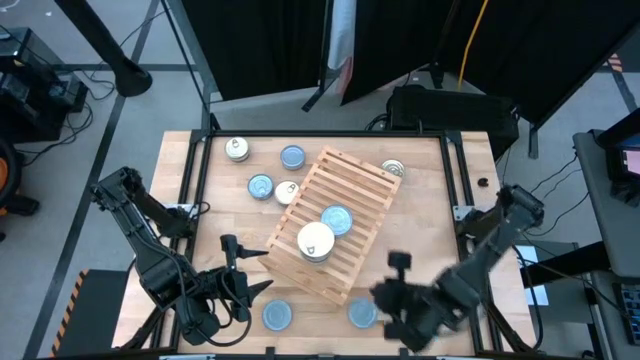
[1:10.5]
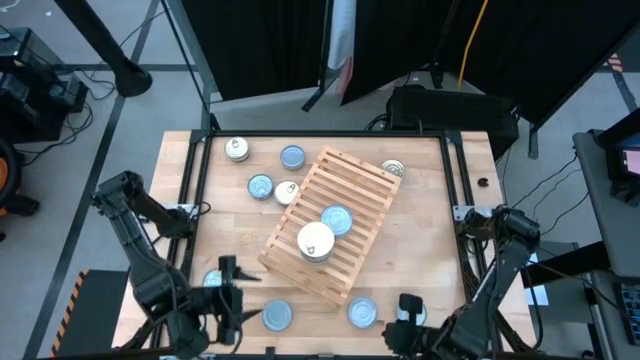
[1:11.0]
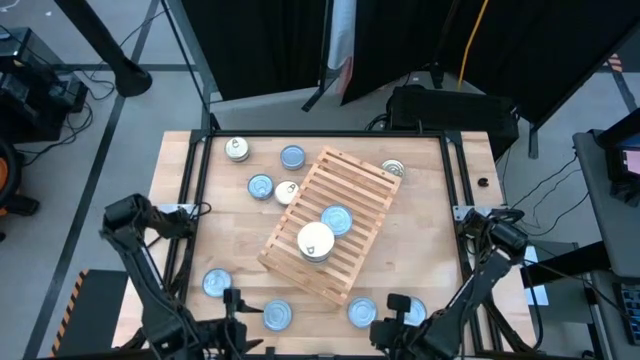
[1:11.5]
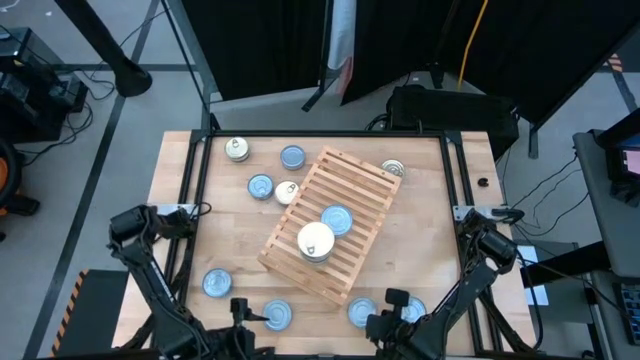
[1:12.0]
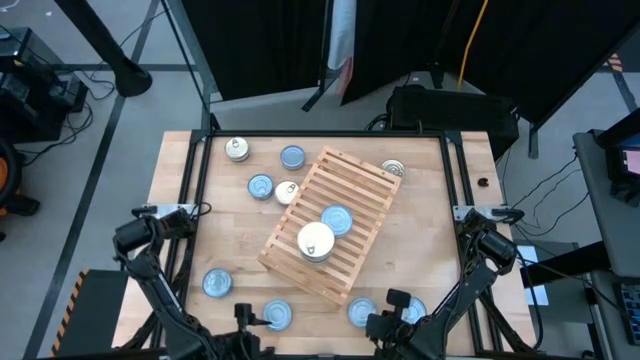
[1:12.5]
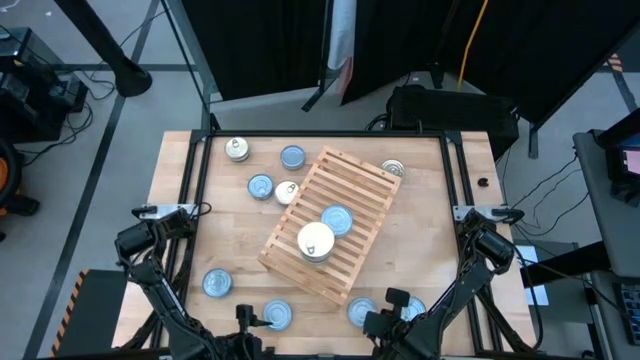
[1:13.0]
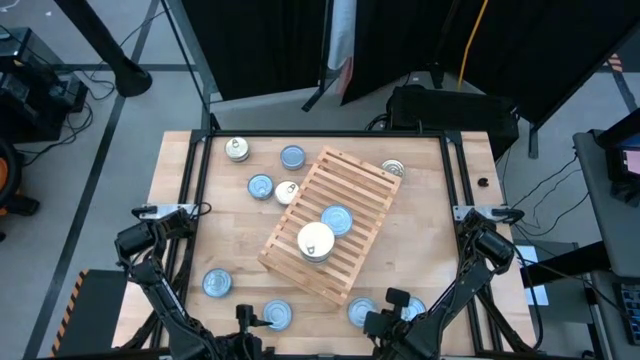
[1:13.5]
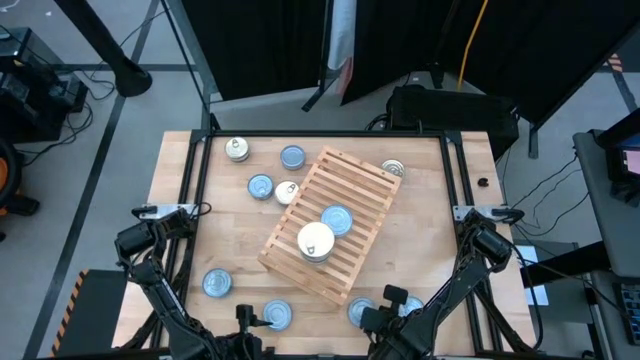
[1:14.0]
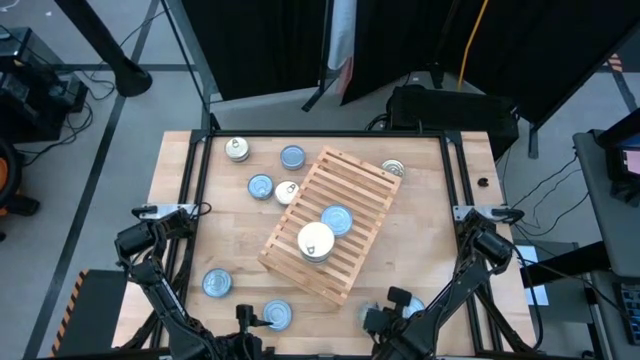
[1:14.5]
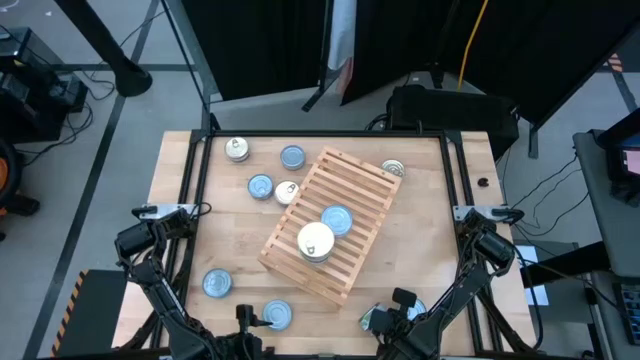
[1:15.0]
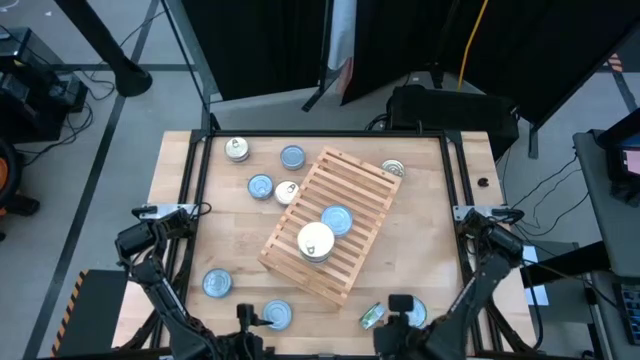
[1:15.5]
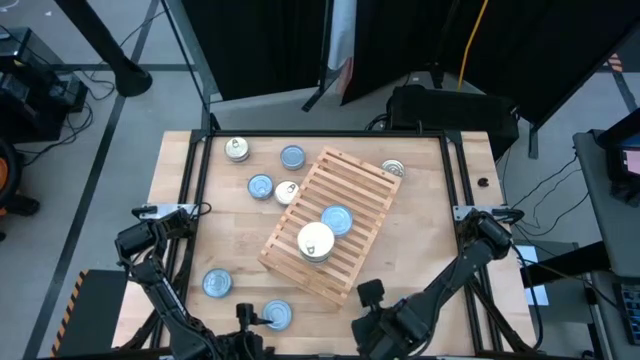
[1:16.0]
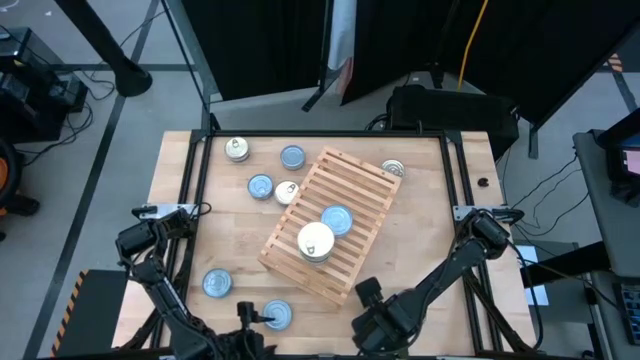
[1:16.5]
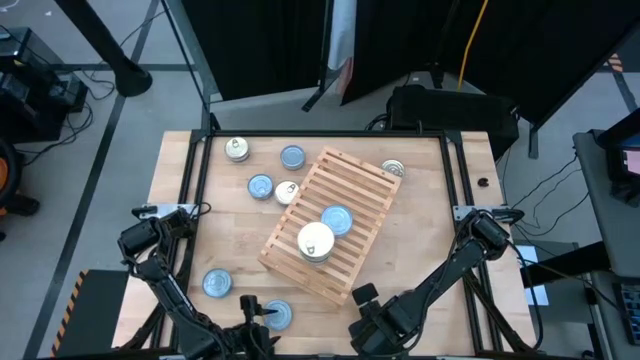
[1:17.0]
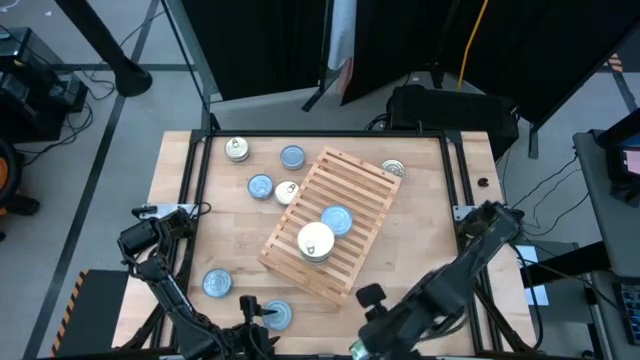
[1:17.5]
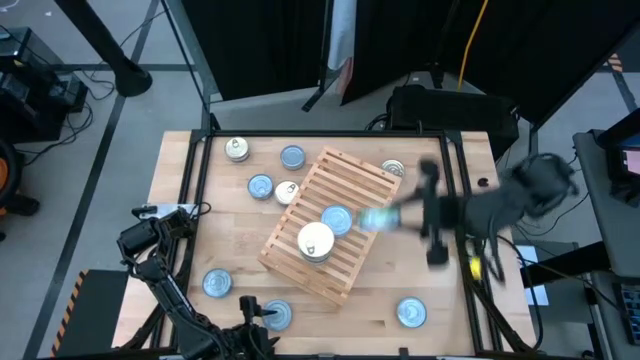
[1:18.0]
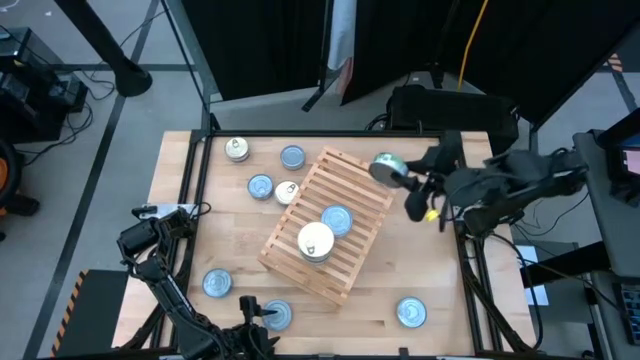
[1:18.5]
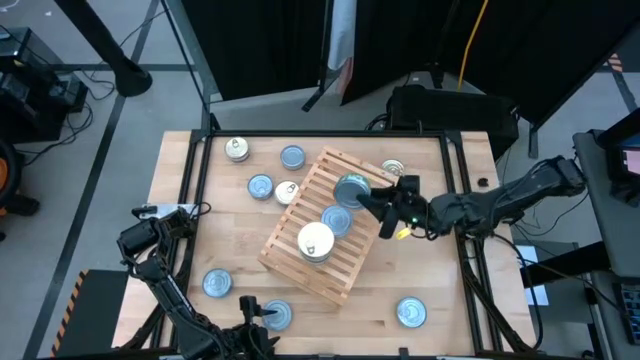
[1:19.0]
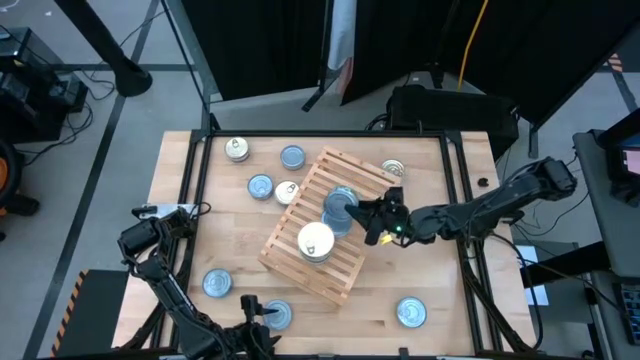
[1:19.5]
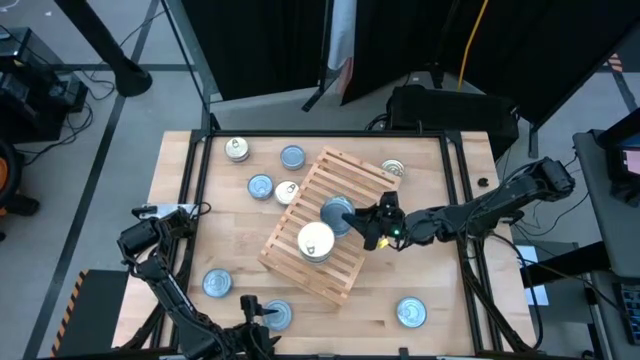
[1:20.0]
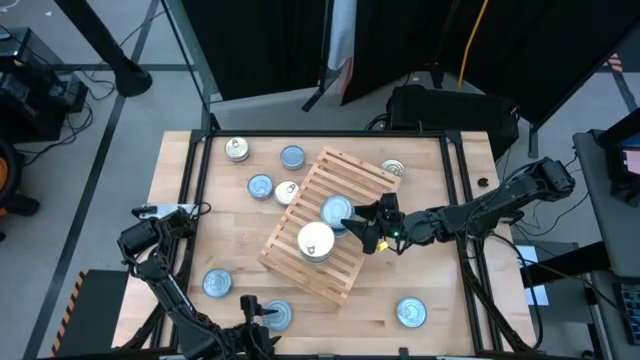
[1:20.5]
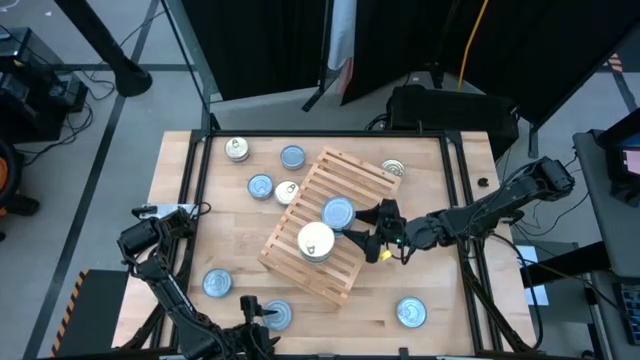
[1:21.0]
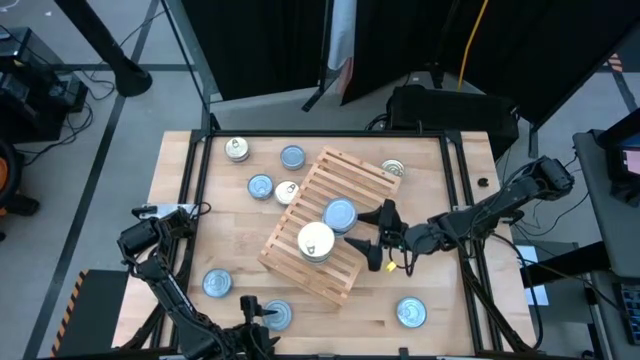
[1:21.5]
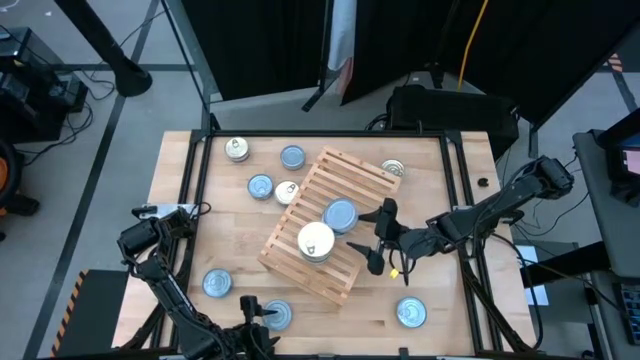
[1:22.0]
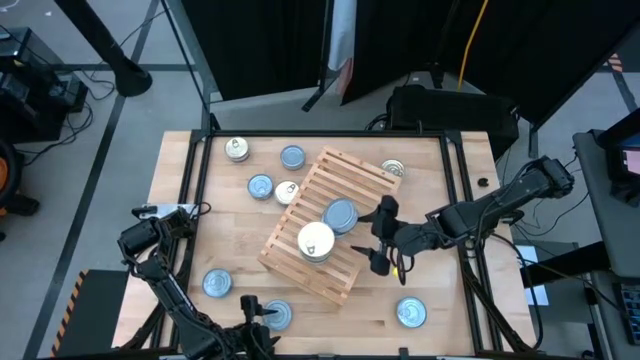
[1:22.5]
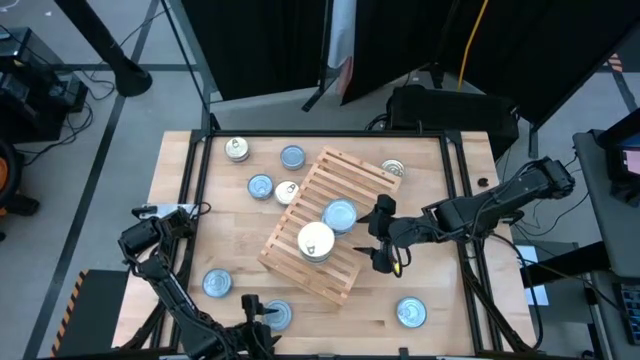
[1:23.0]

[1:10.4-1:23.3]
Task: Stack canned seafood by type on shelf
Stack the green tuna can on top of the other green tuna can on the shelf

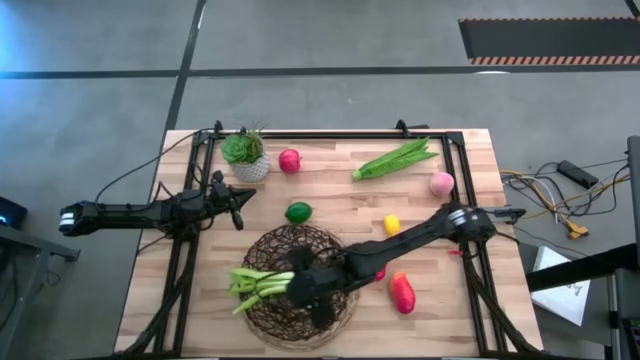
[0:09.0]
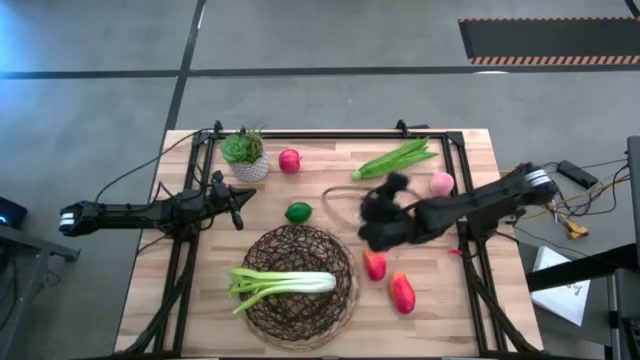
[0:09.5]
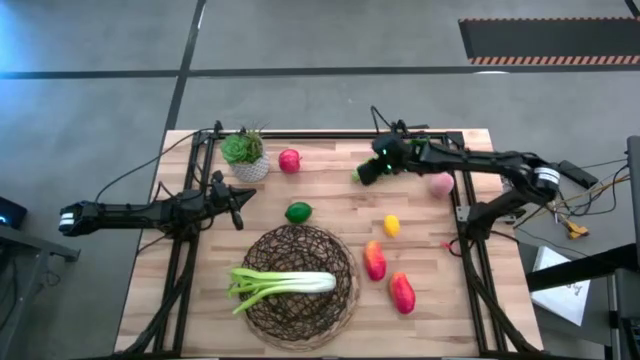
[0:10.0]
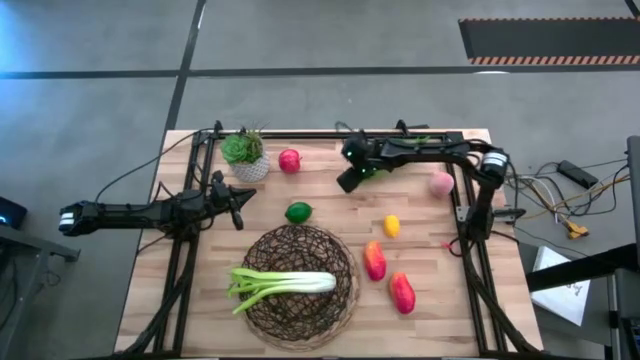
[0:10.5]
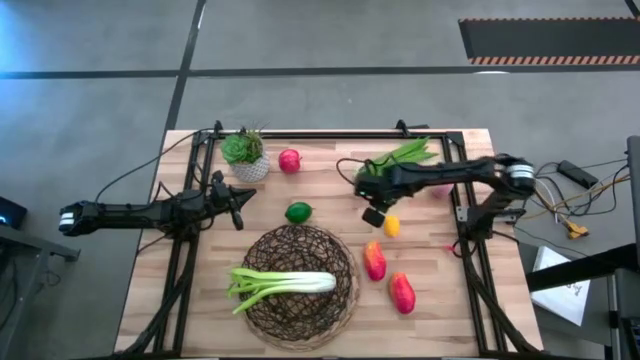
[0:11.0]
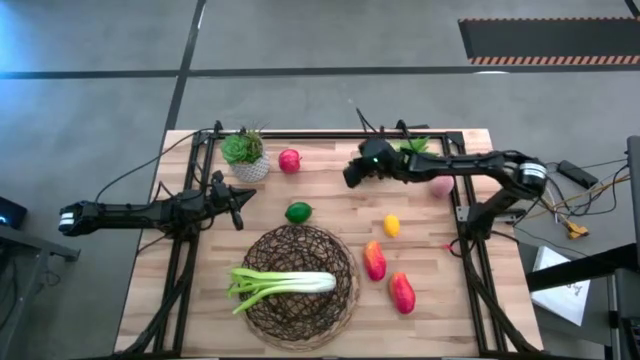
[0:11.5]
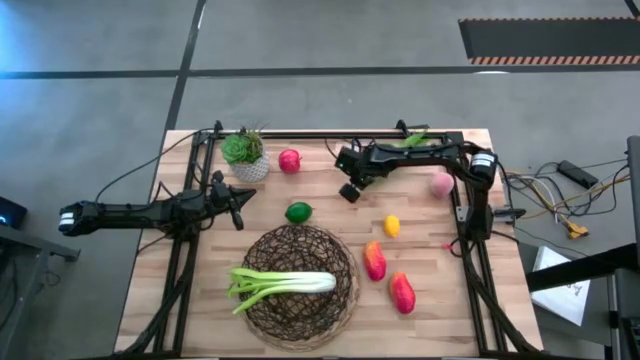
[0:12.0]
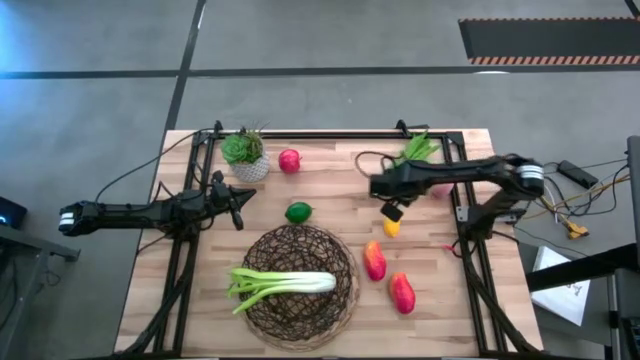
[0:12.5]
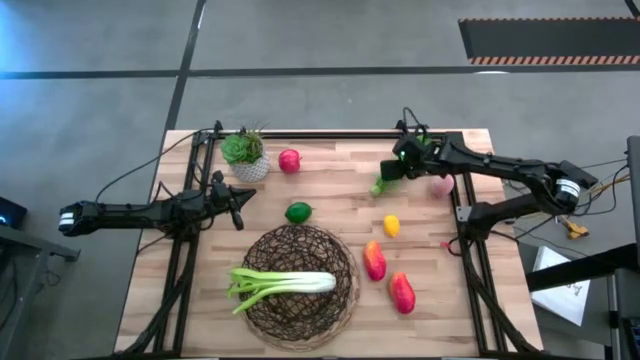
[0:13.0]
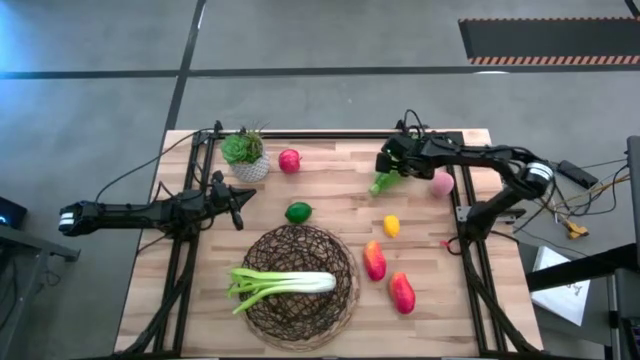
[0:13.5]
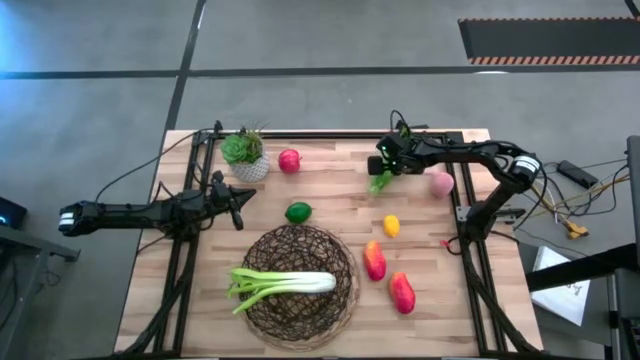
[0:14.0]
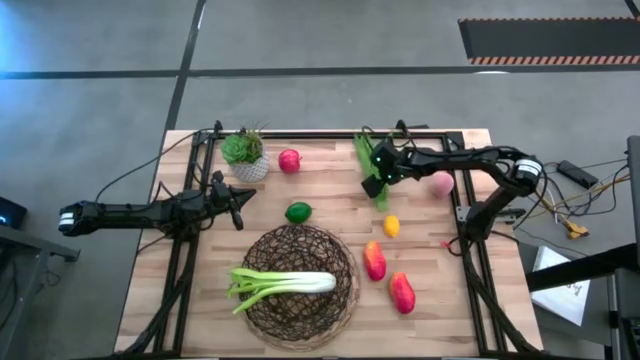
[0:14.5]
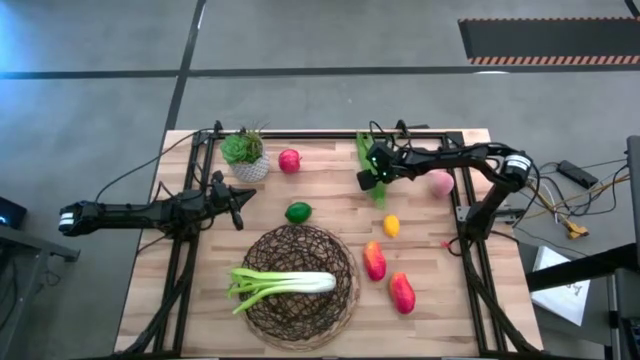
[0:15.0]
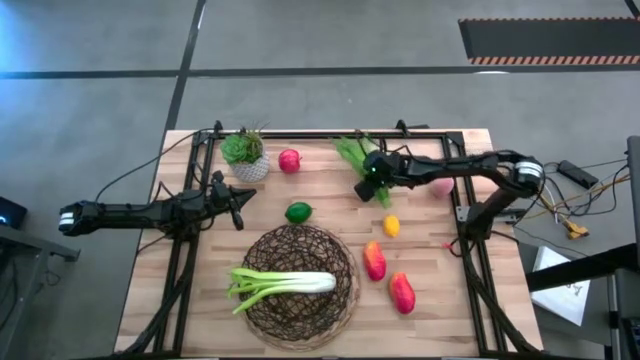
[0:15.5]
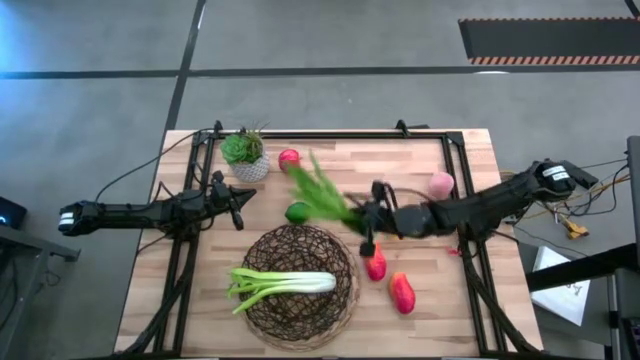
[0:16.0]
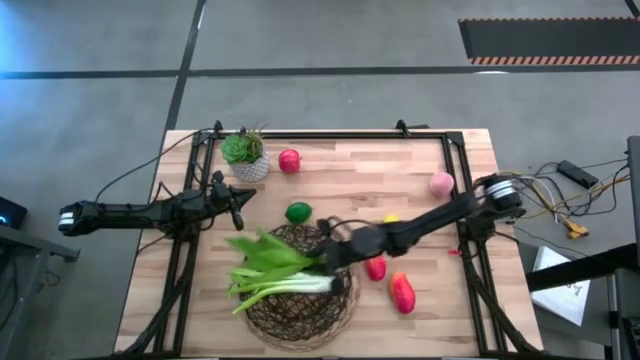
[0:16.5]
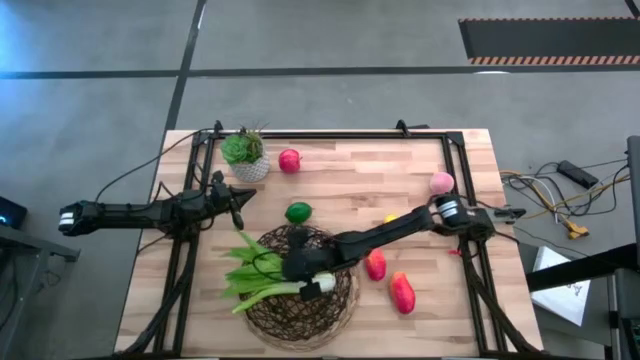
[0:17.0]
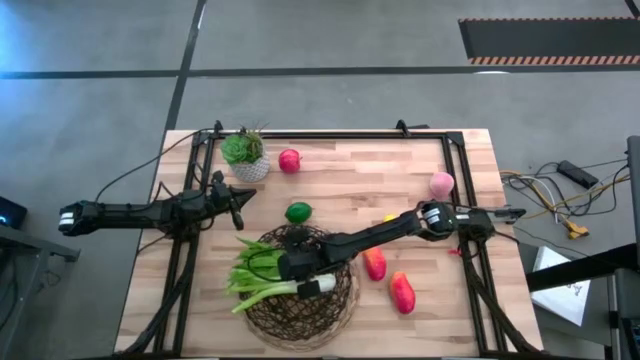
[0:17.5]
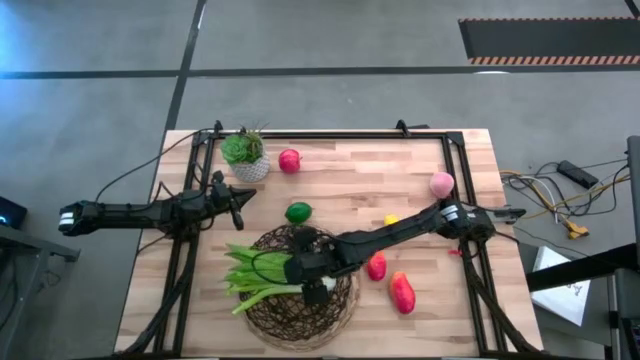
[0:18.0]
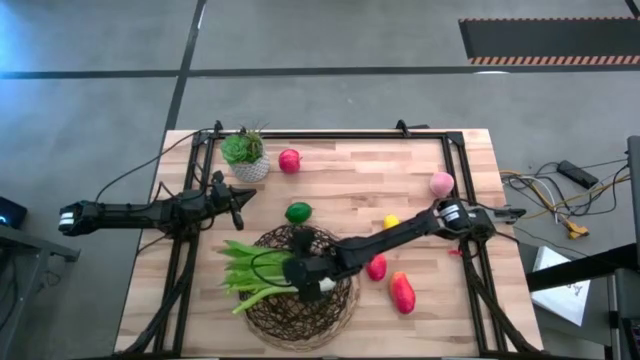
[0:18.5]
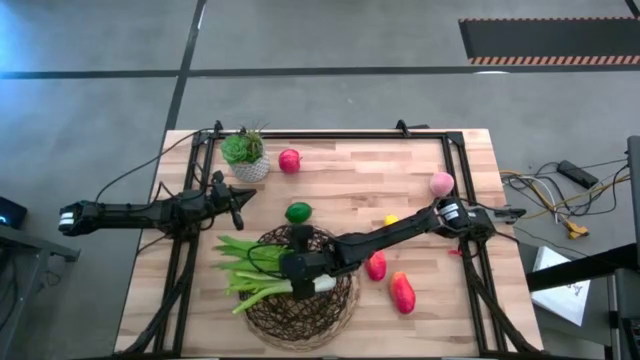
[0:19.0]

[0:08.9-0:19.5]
Task: Build produce basket
Put the lettuce into the mesh basket
